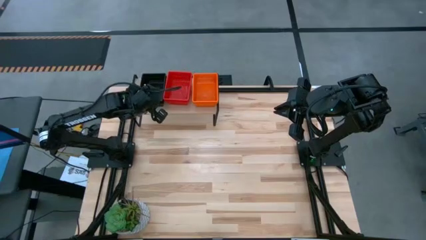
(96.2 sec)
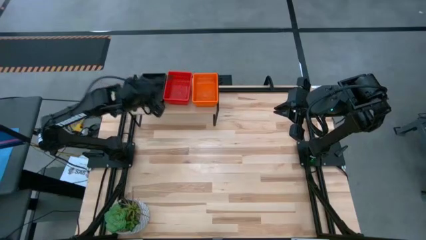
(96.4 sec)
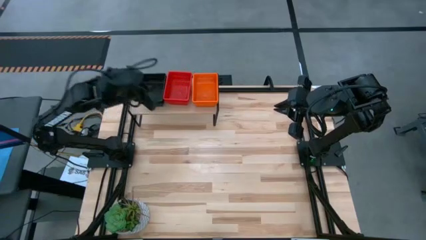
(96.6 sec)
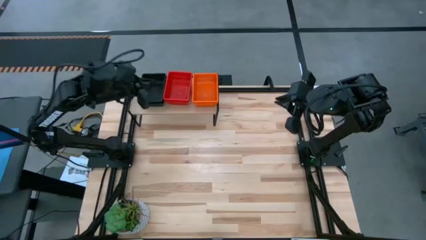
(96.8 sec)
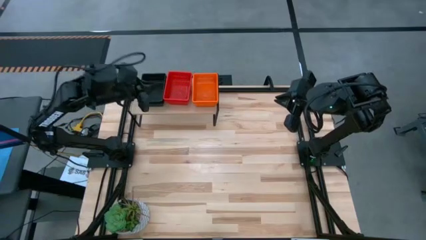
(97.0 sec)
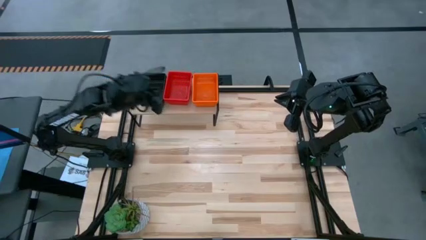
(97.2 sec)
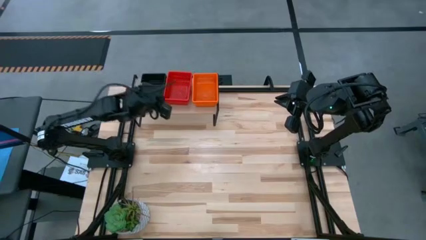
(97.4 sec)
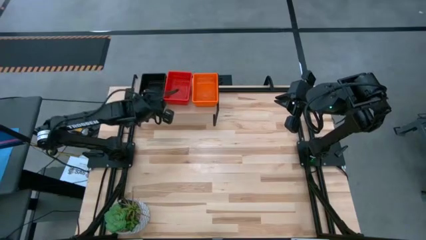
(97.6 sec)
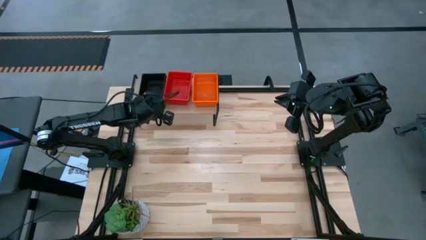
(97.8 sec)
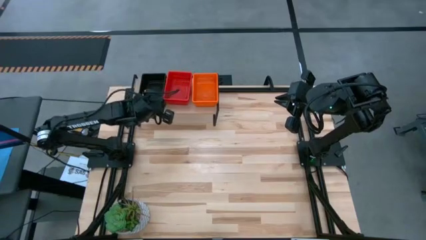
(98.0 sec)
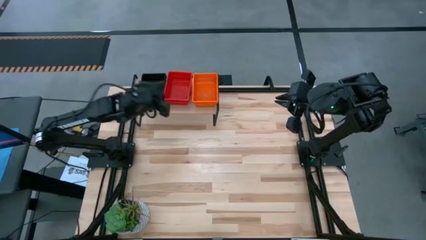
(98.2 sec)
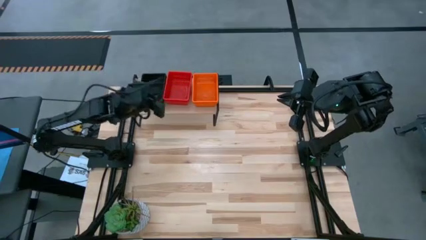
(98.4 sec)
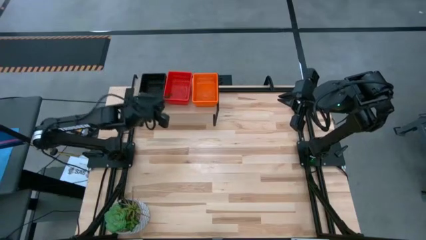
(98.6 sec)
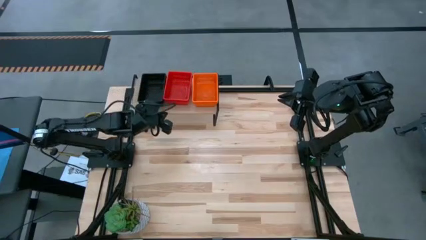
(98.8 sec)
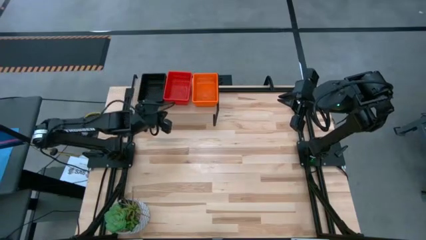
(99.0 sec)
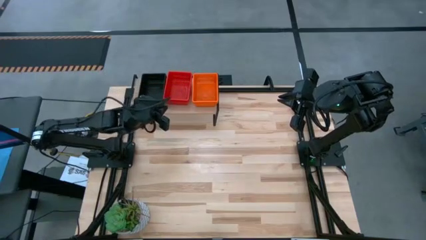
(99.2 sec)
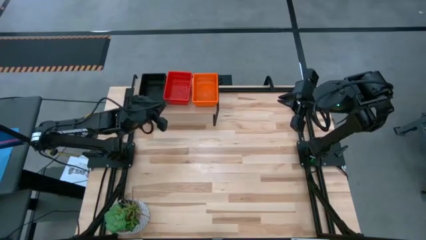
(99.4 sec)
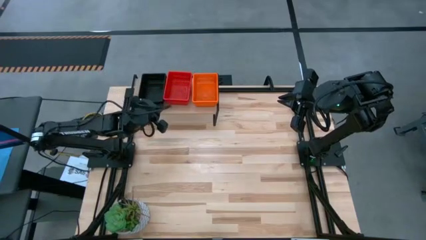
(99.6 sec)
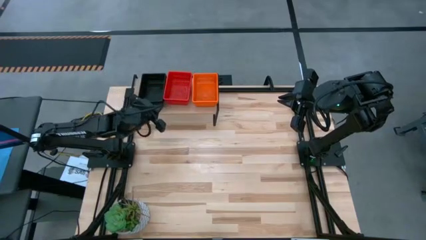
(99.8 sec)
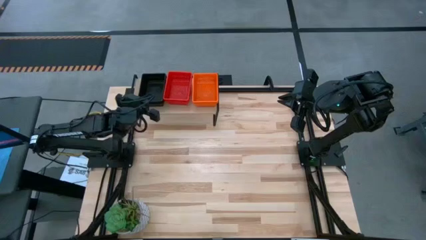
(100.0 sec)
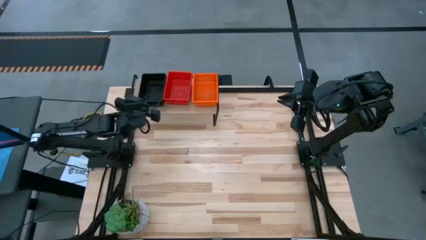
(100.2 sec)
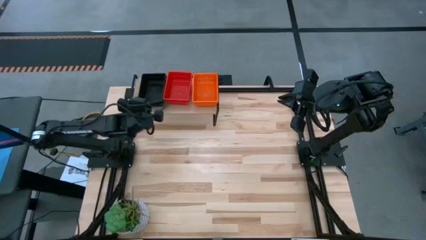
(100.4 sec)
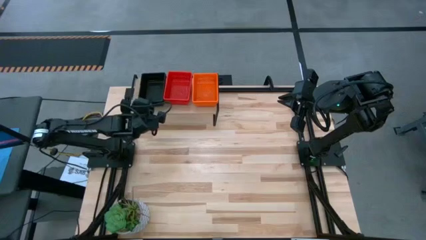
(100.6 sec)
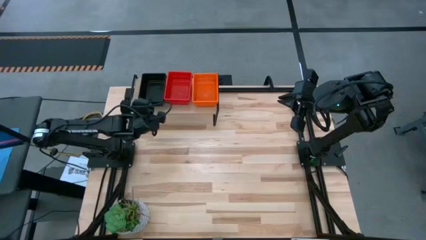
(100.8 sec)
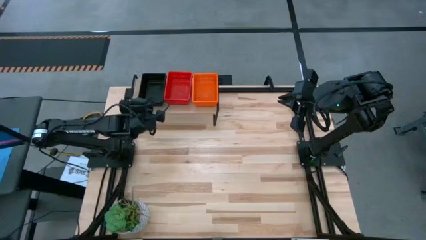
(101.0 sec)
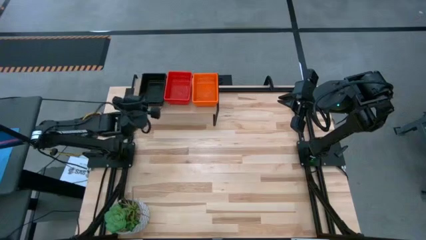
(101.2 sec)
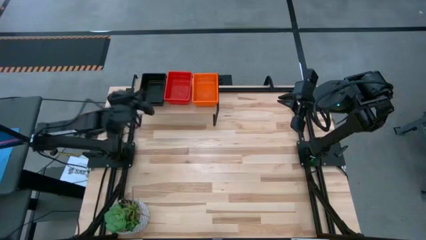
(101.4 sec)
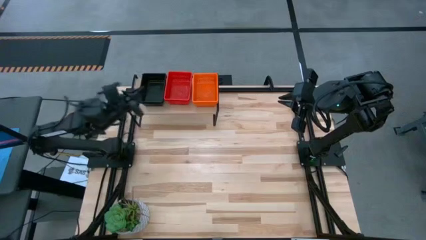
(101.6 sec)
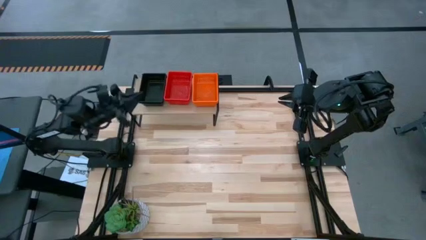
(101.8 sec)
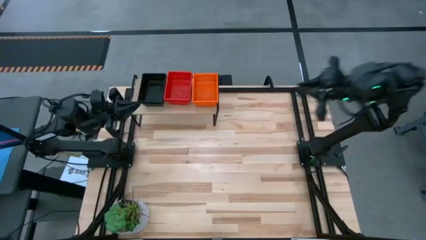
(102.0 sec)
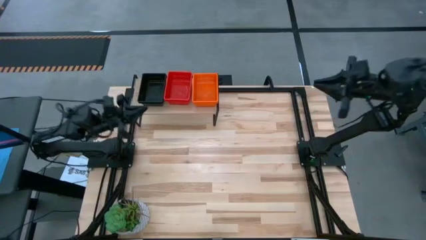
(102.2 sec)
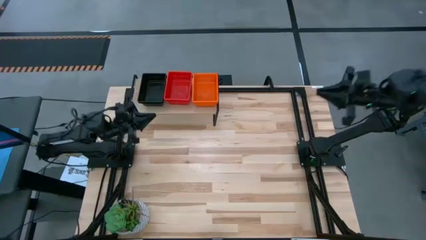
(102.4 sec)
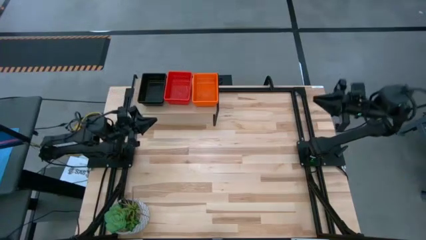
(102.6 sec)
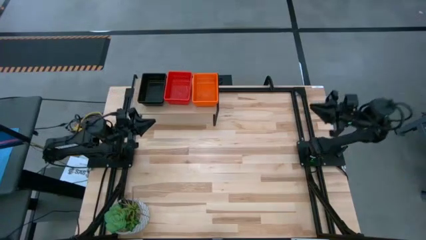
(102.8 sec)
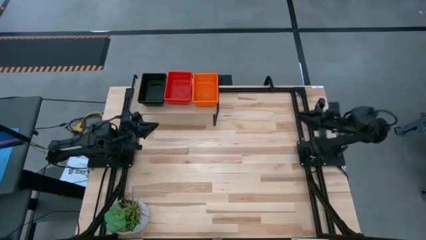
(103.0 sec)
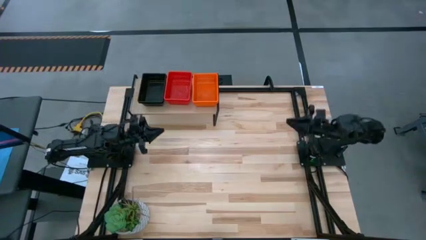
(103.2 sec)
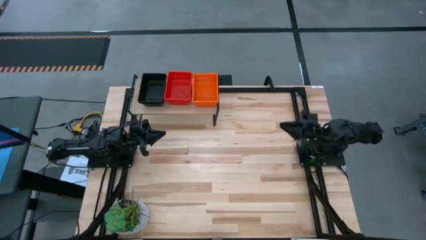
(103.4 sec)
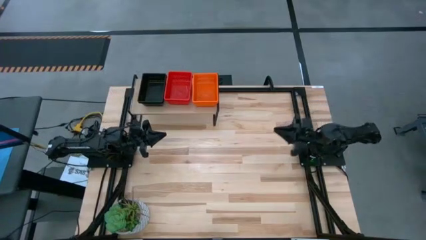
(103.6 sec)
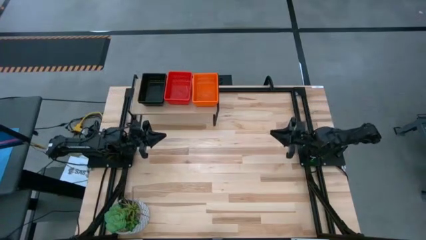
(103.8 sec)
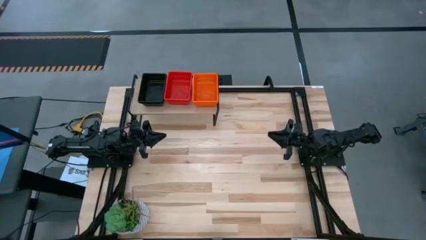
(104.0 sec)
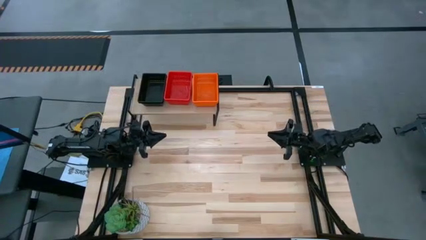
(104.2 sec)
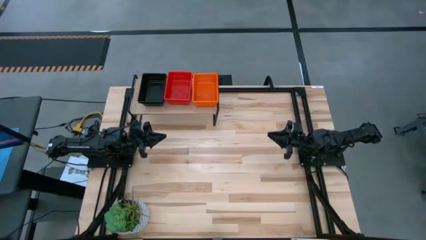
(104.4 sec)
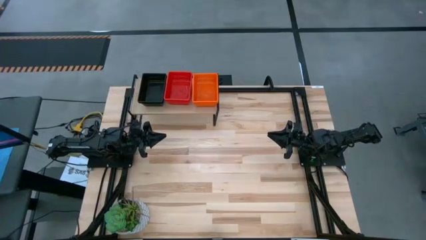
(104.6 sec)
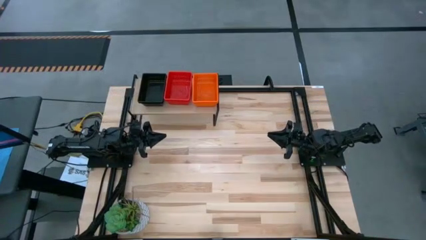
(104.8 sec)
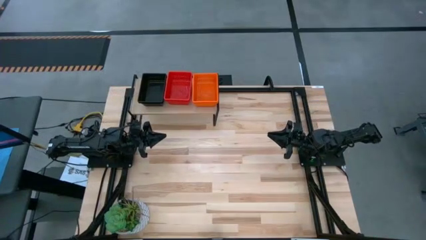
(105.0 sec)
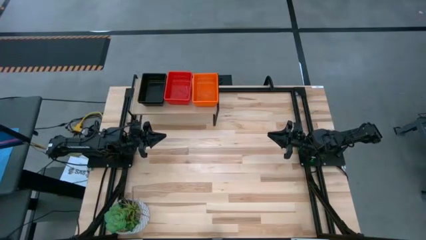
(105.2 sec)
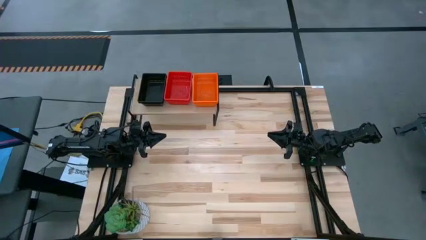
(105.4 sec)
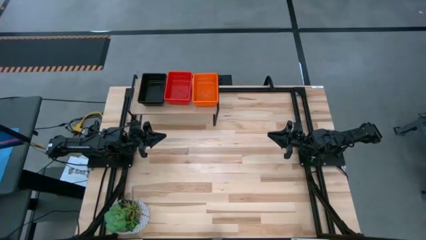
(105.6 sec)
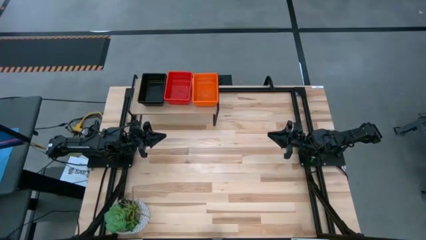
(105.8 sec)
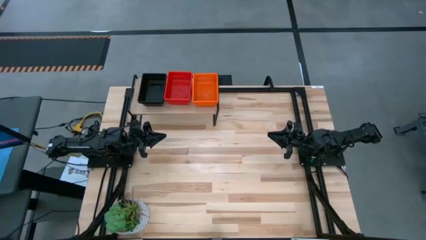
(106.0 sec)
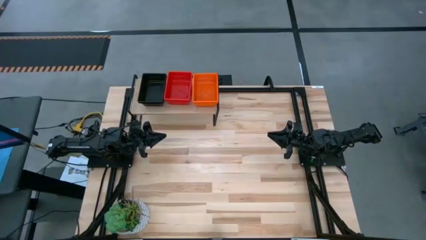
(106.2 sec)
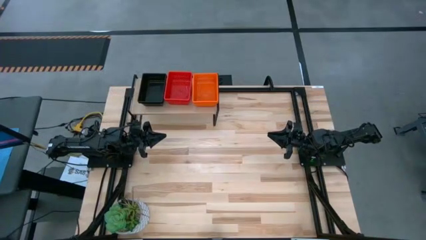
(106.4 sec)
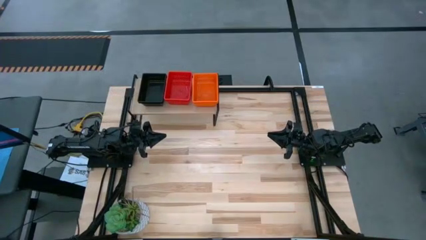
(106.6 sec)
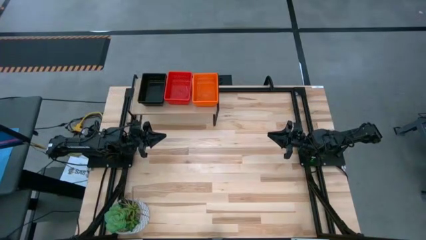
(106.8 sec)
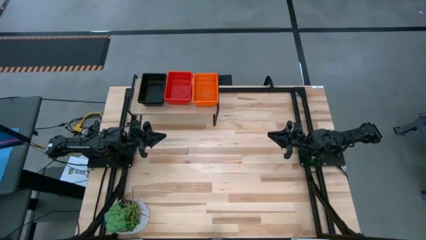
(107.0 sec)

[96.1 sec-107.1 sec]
Task: Stack baskets on shelf by color
Return to Home Position
